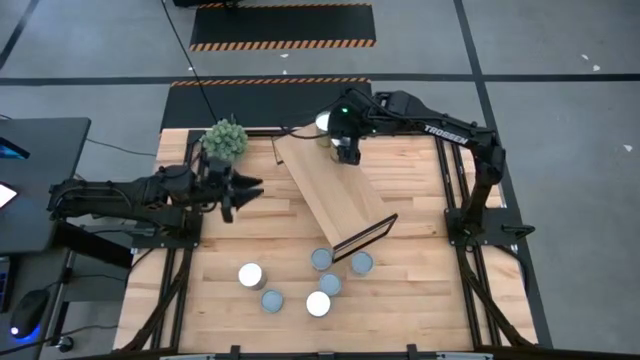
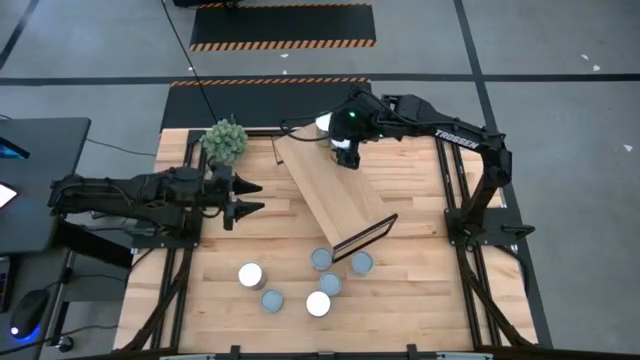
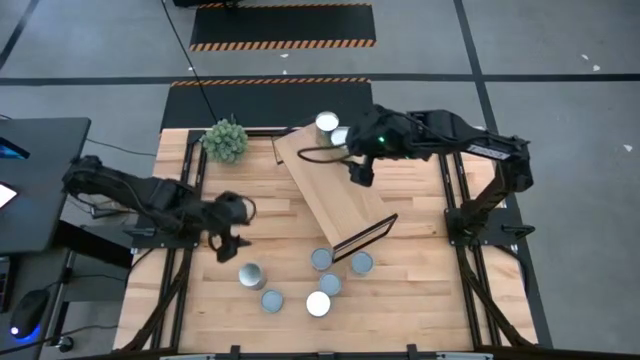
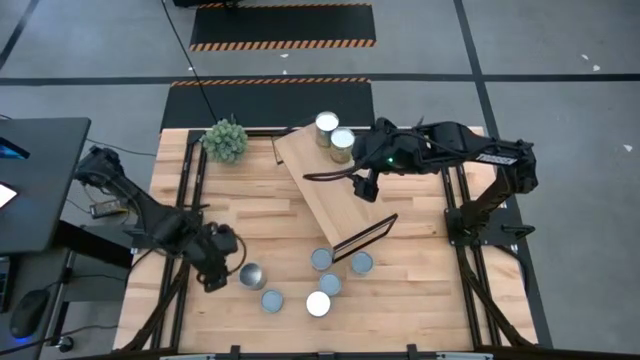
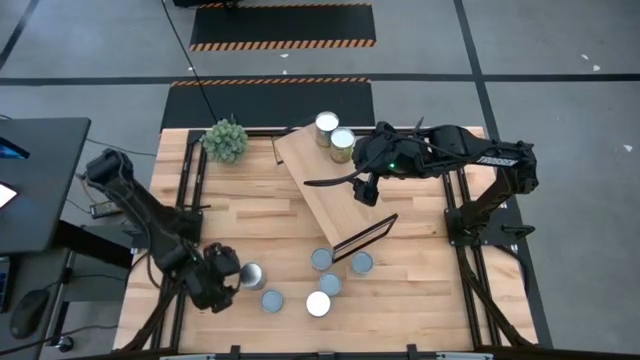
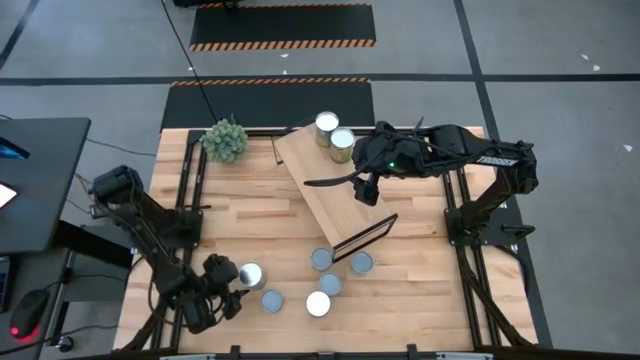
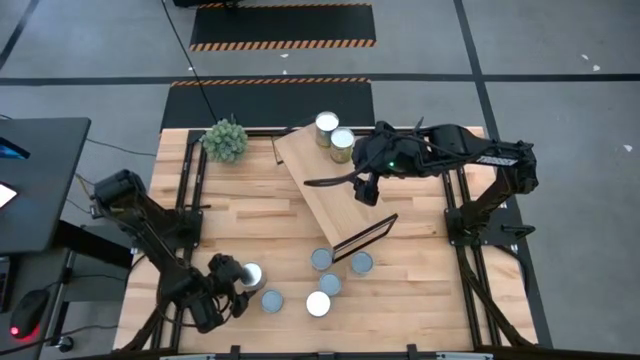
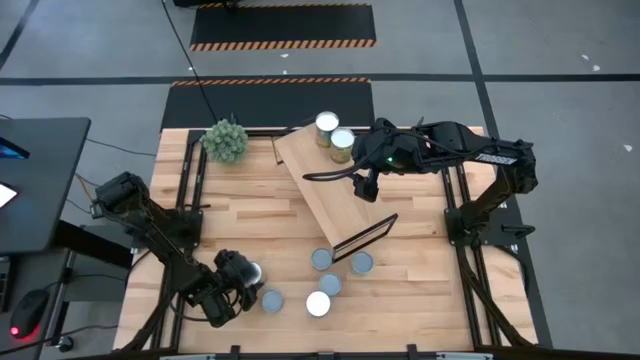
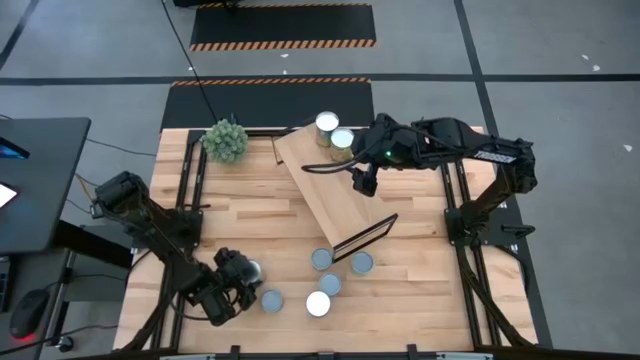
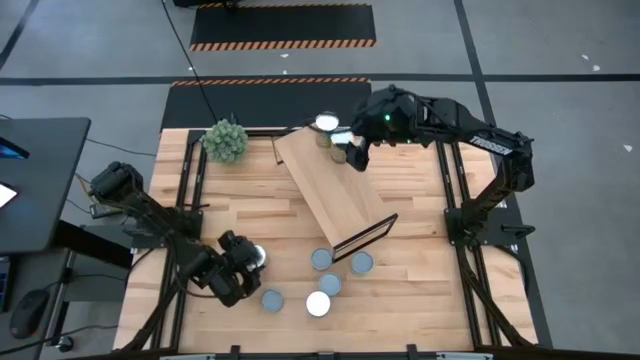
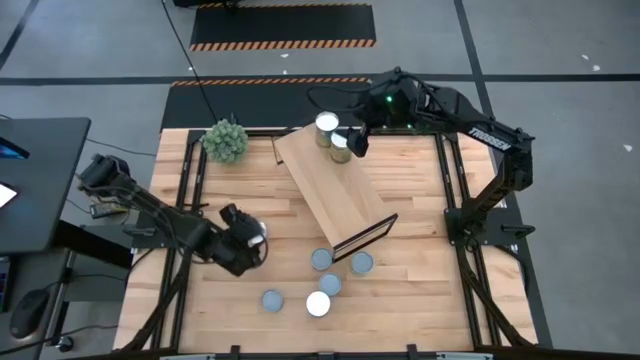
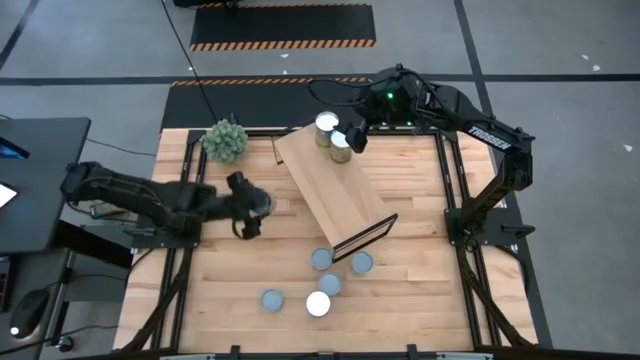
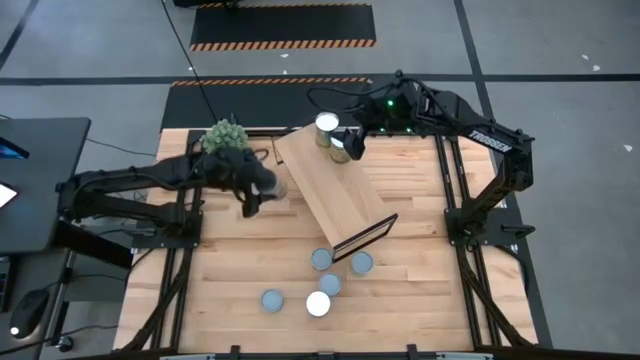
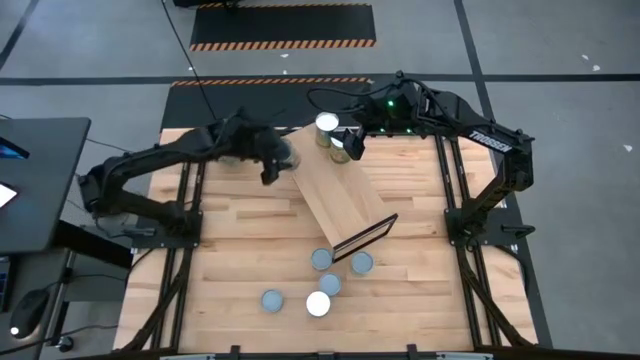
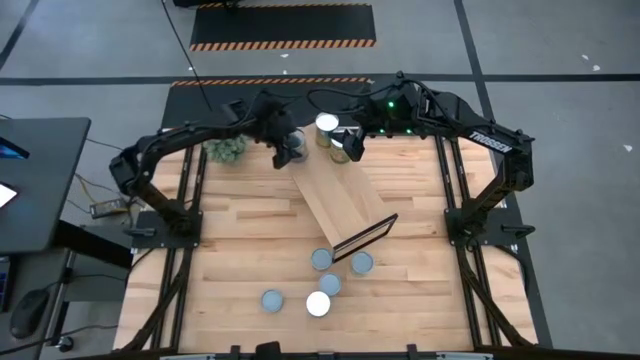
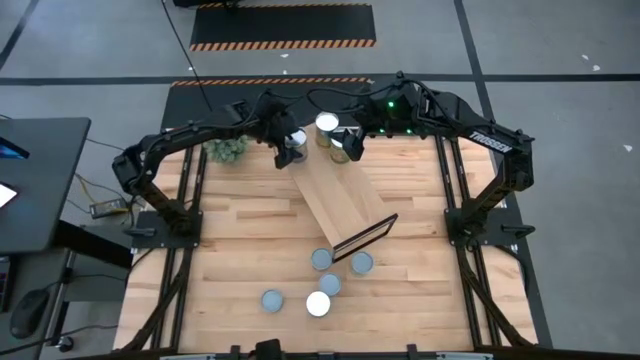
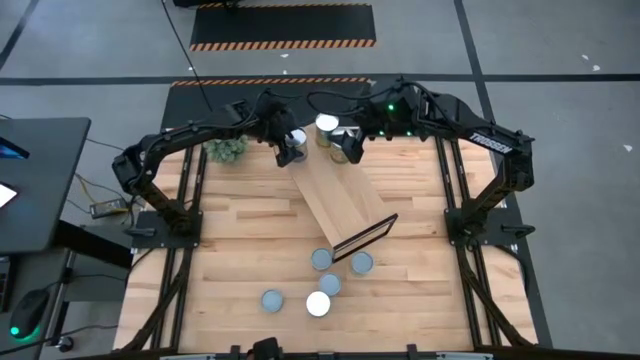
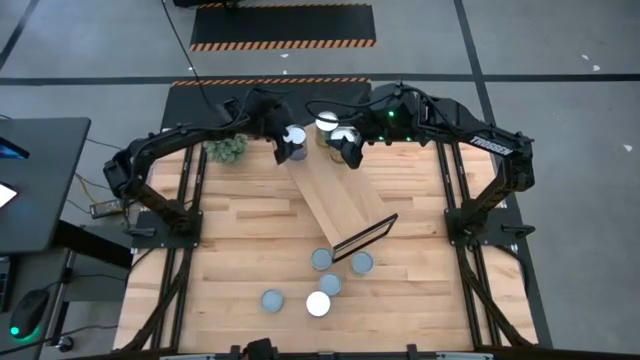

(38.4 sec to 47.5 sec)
Task: Pick and place cans onto a shelf
Put the green-purple can on the shelf

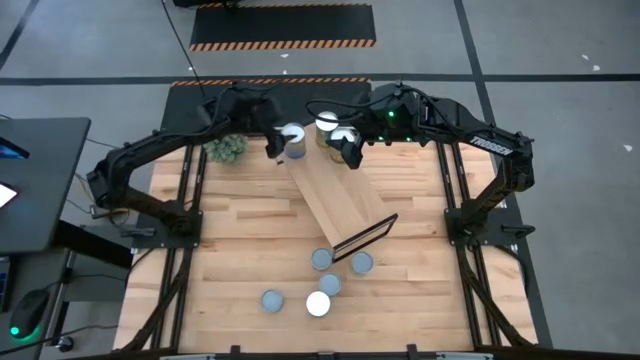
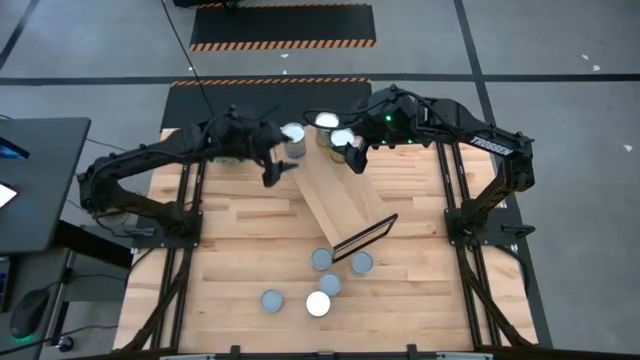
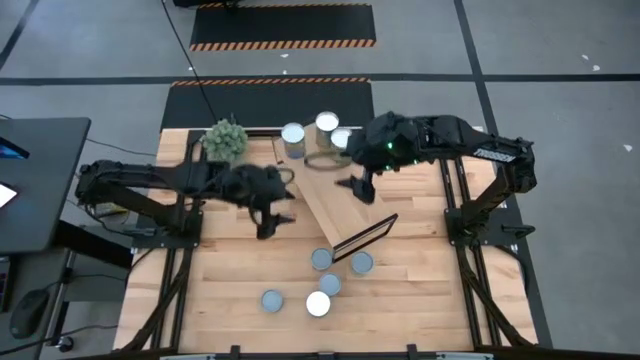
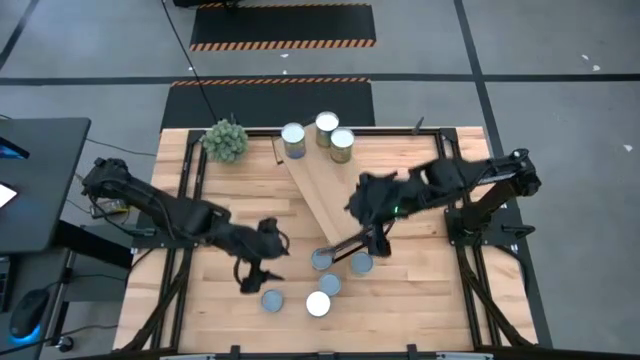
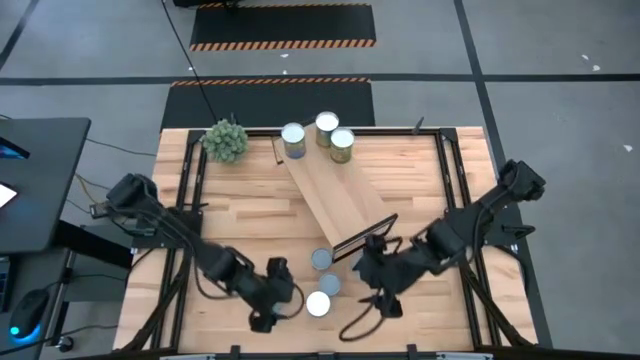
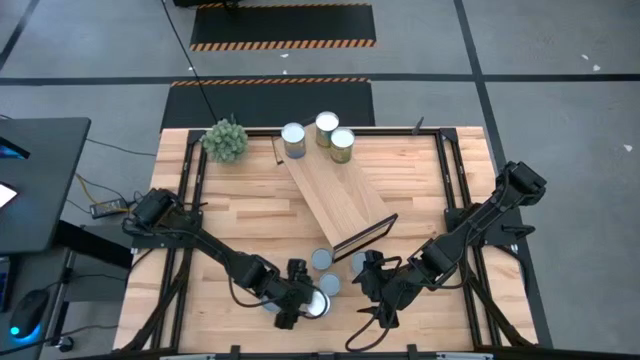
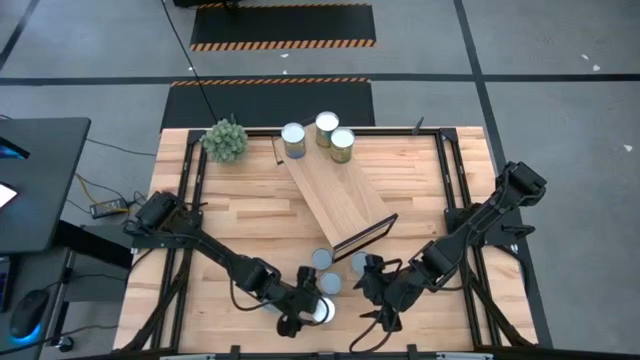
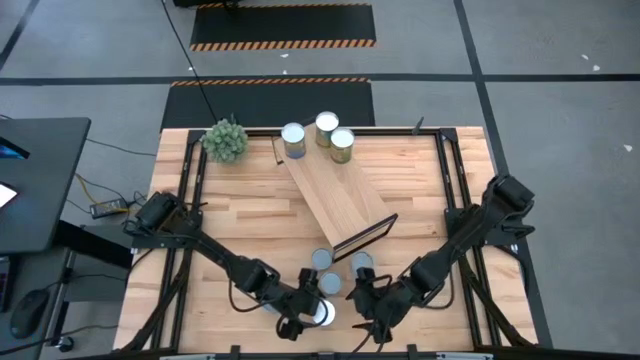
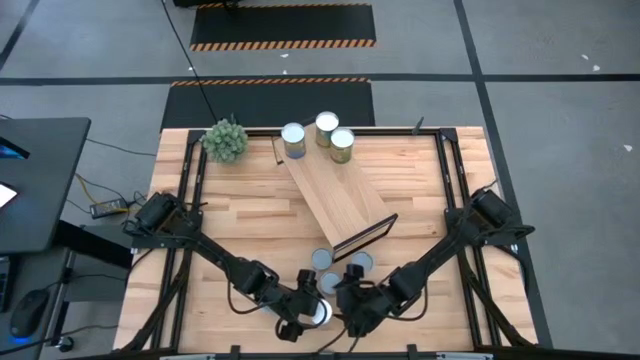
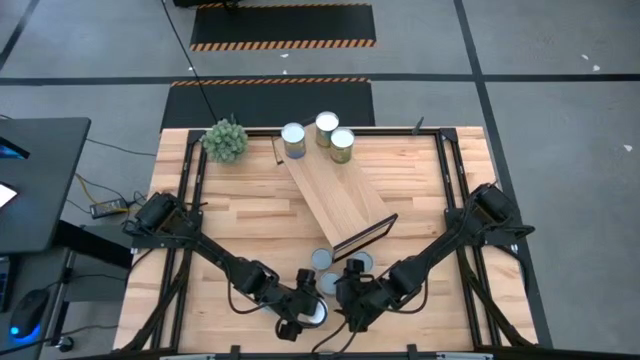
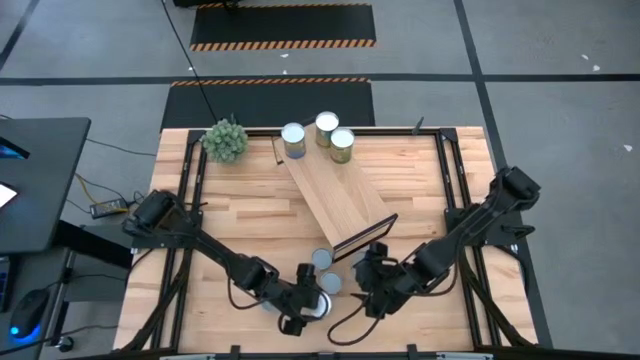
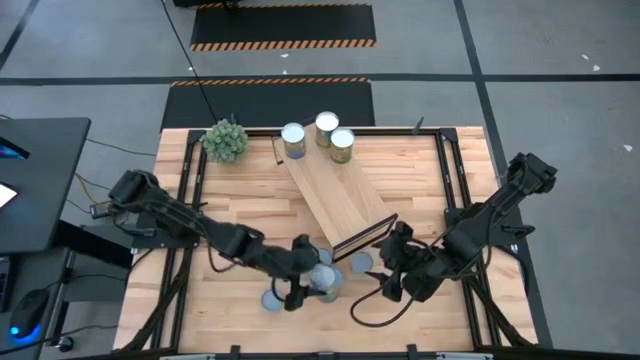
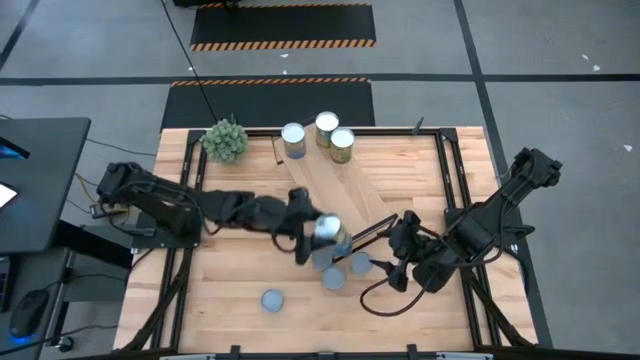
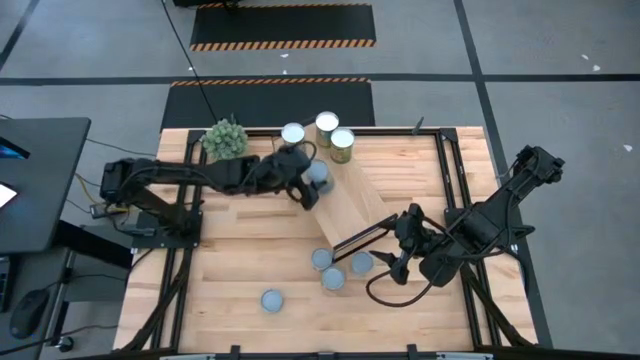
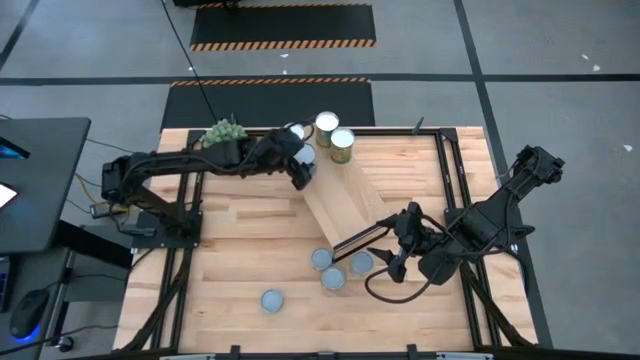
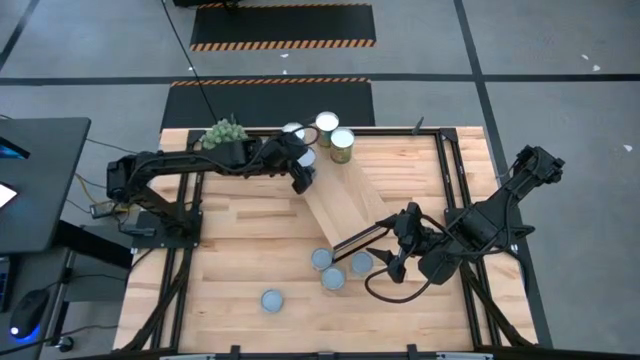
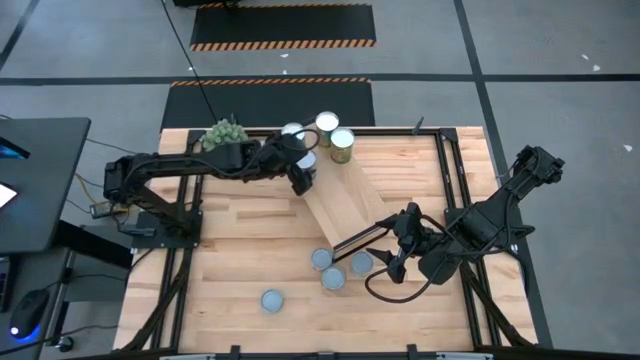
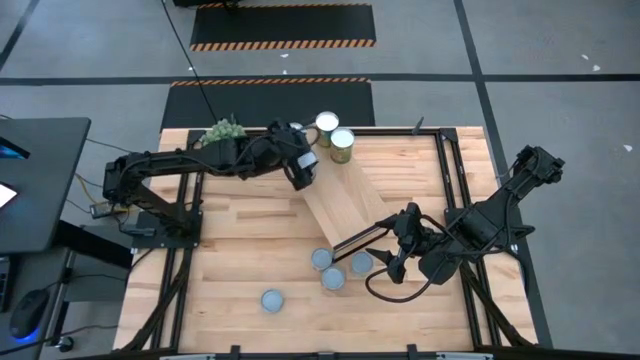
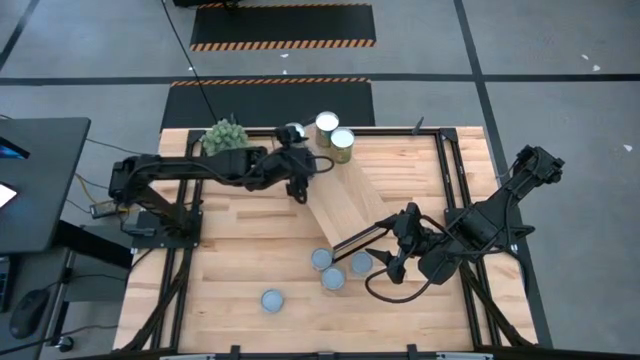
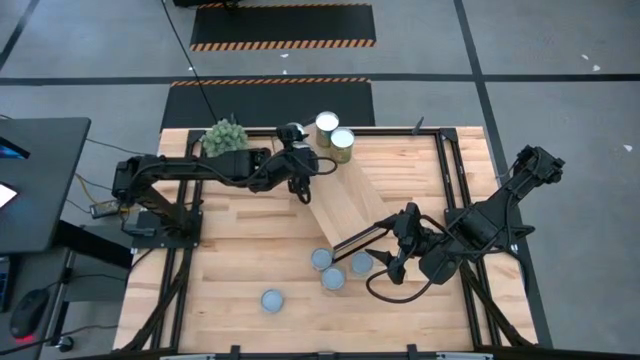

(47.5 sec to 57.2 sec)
Put the green-purple can on the shelf

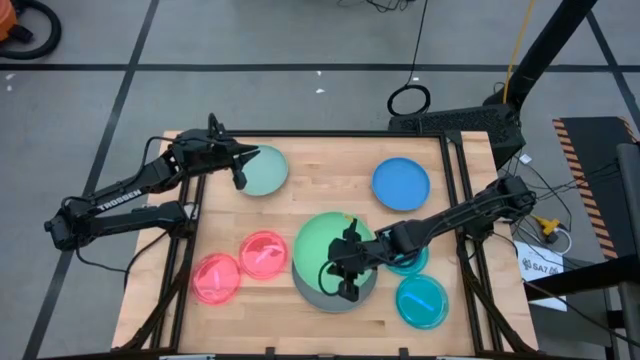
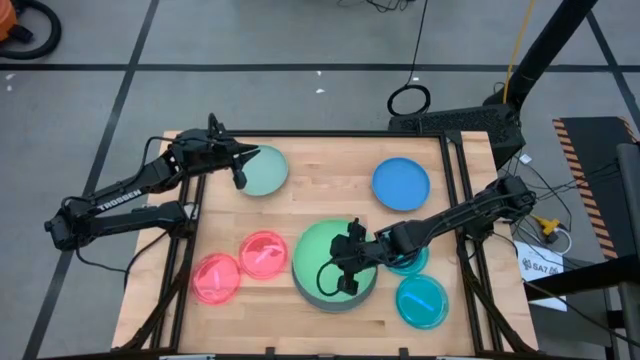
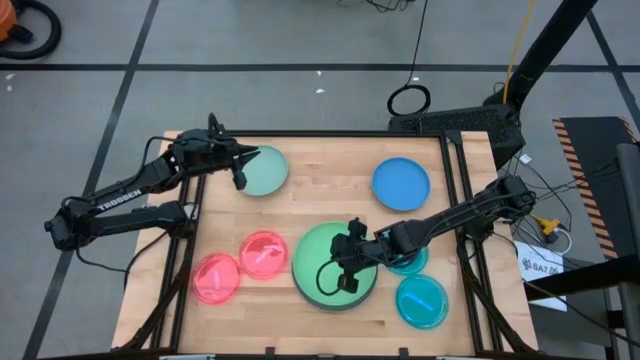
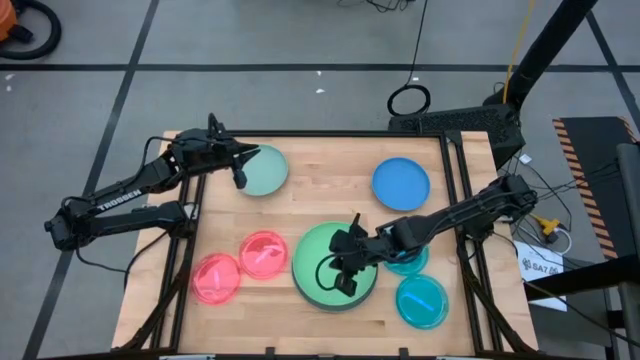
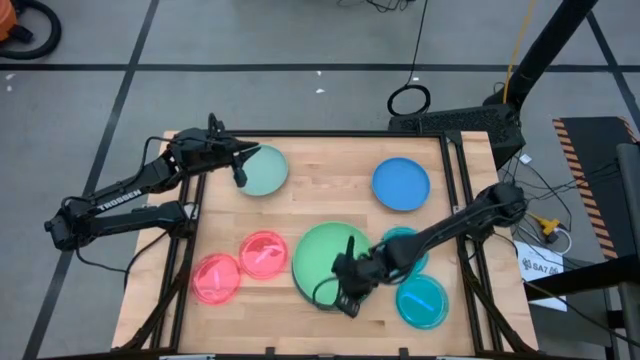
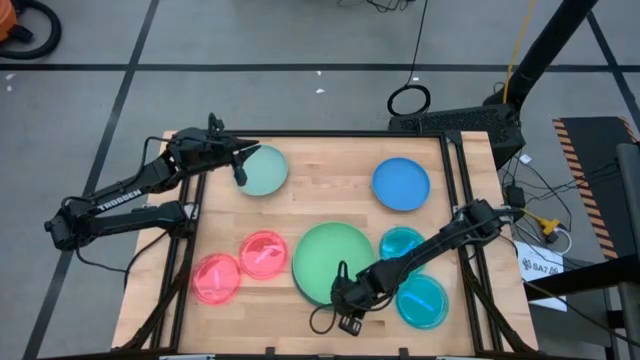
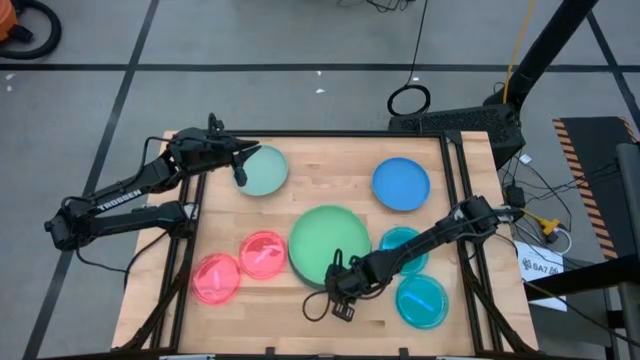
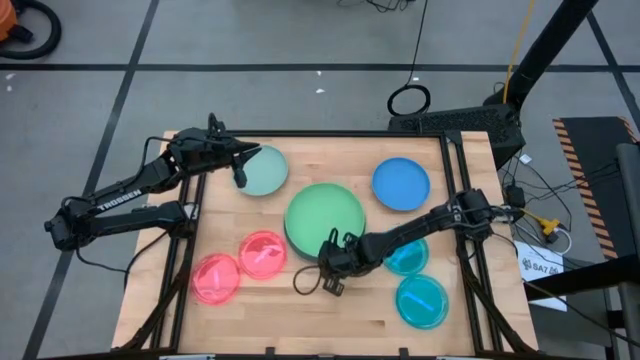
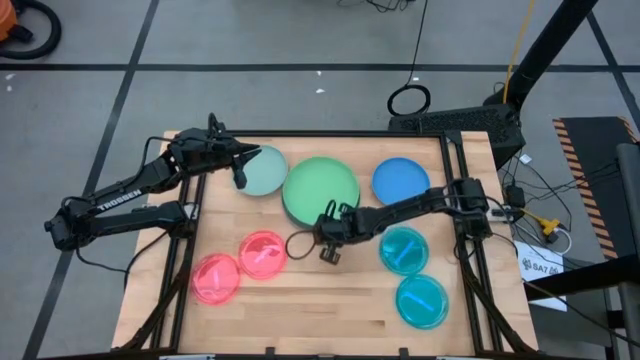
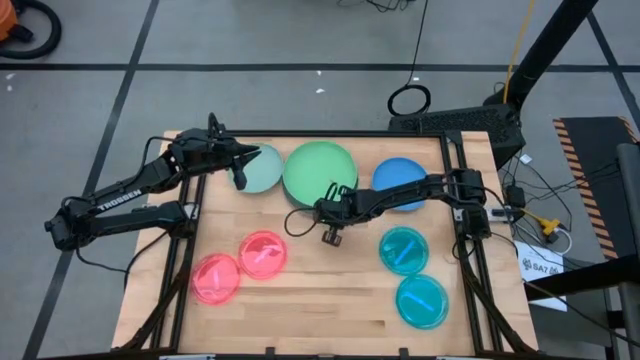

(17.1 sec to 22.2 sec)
Task: Stack plastic plates
Move the stacked plates to the top center
